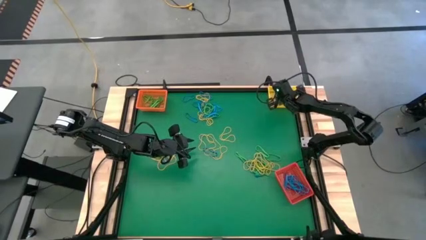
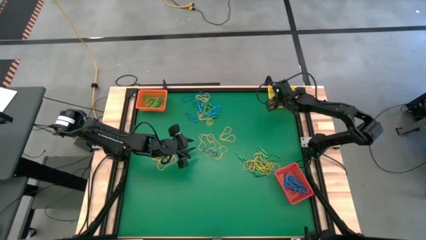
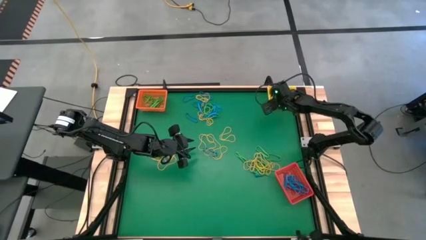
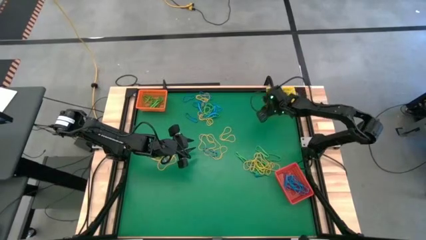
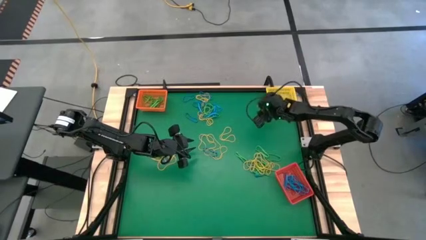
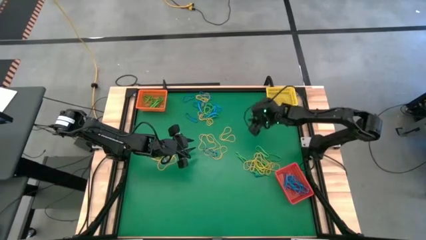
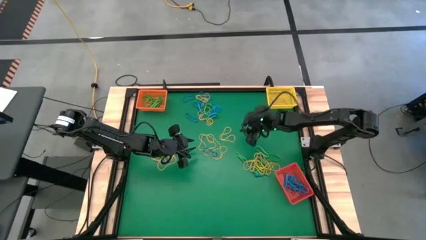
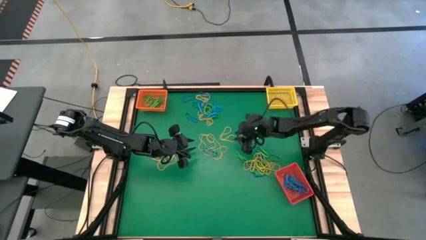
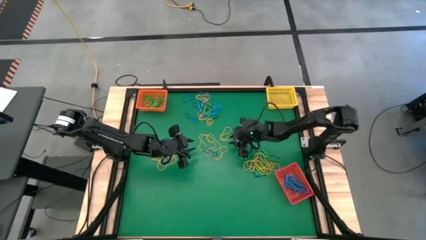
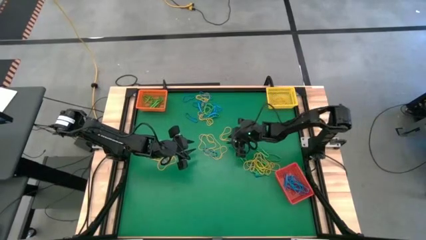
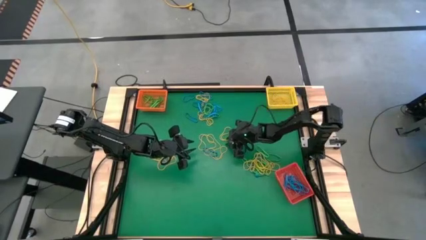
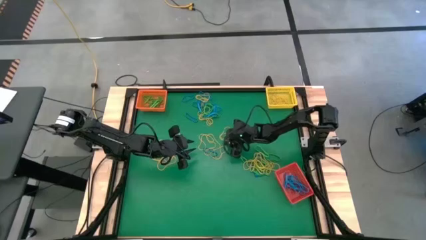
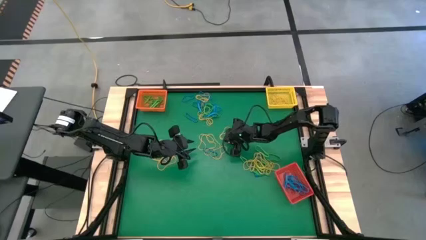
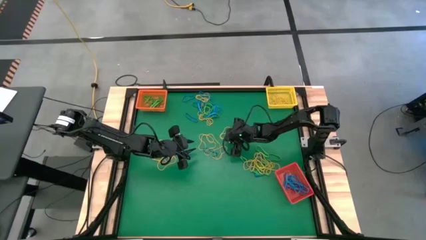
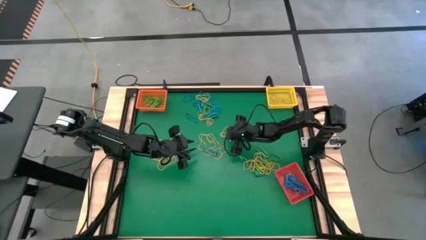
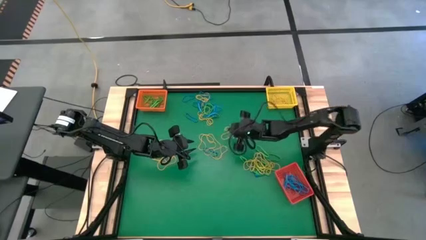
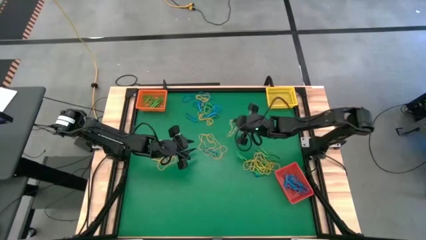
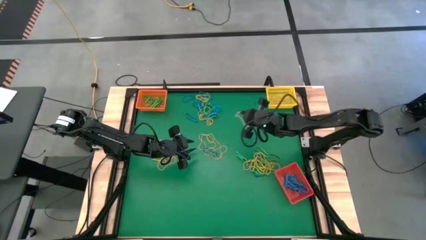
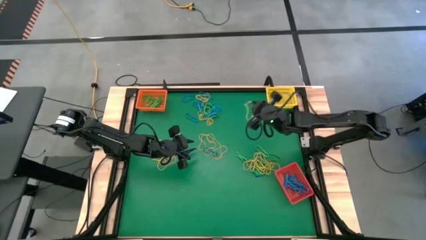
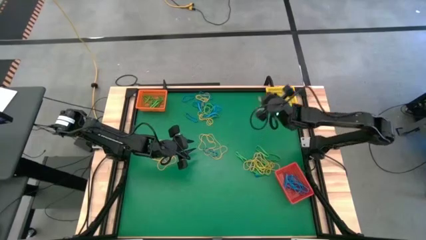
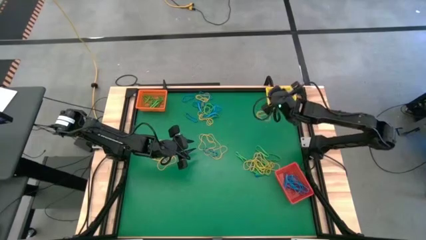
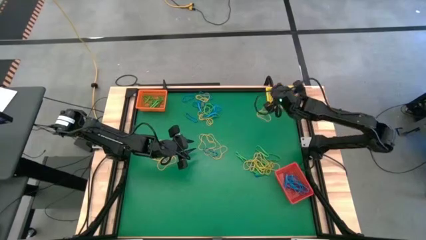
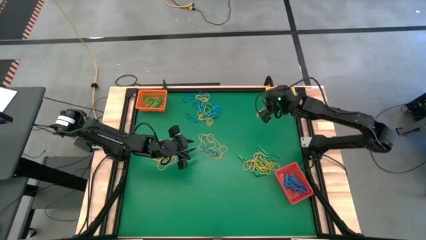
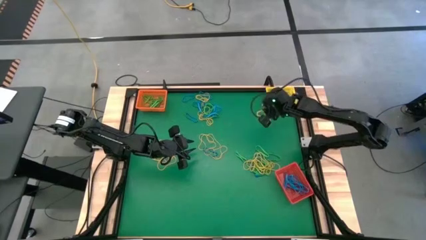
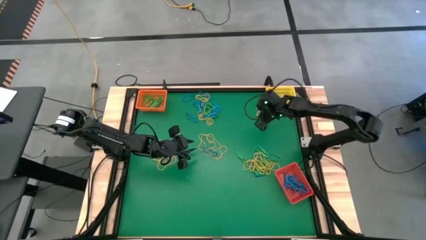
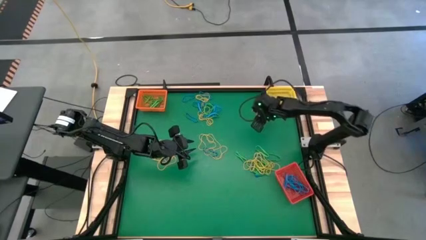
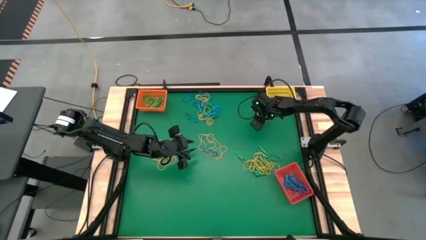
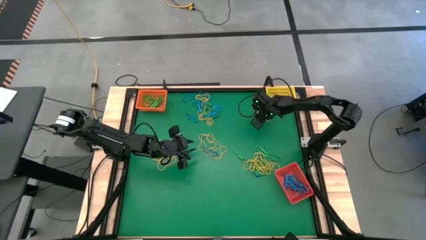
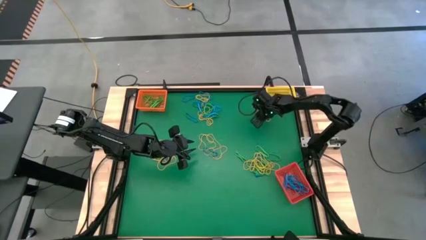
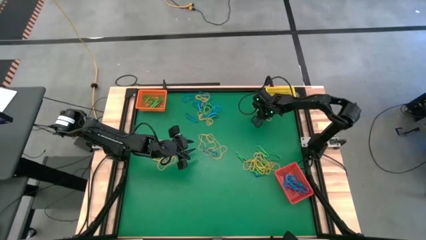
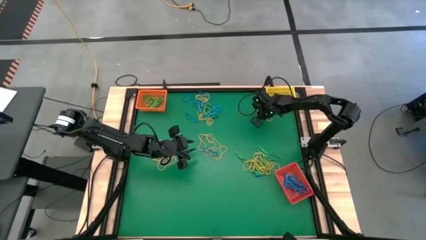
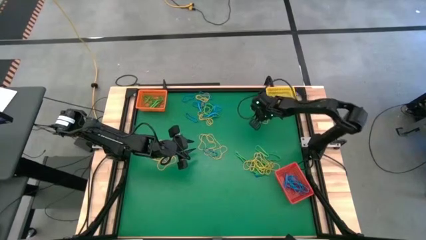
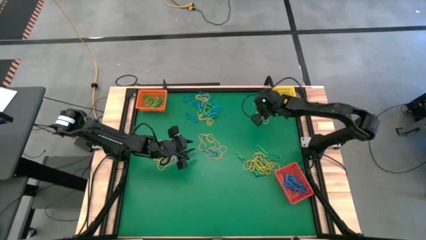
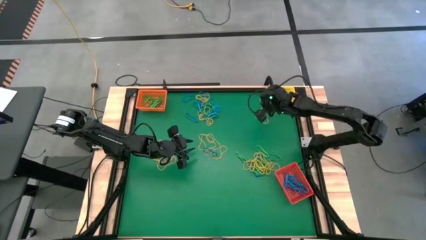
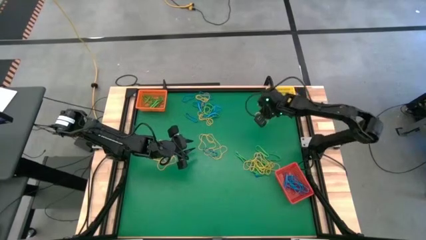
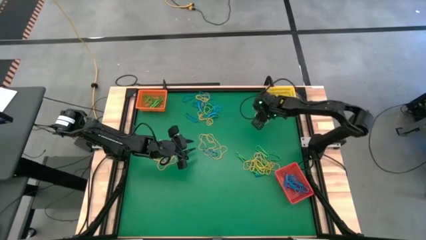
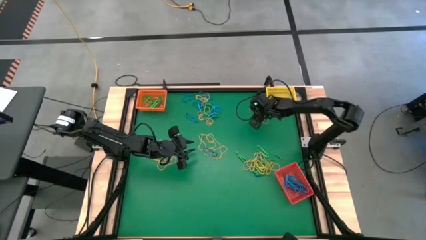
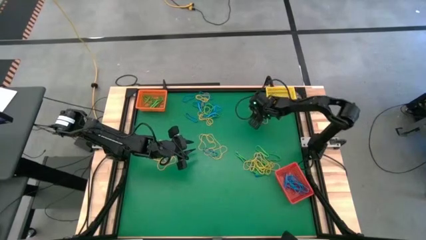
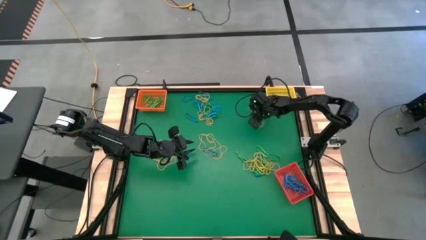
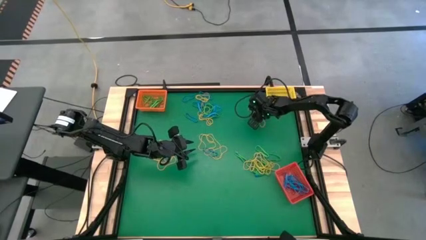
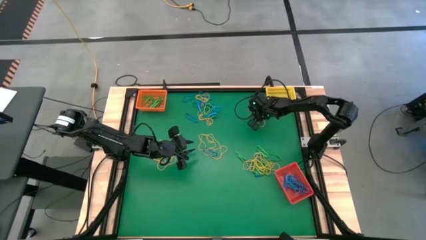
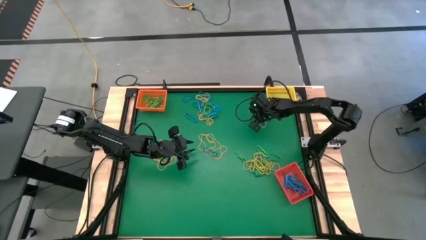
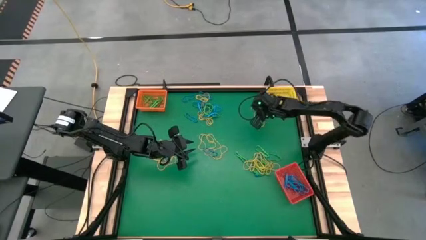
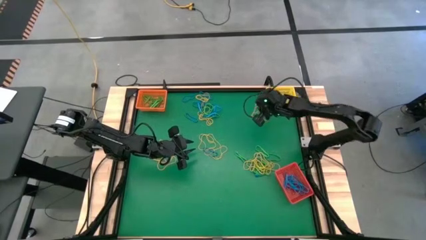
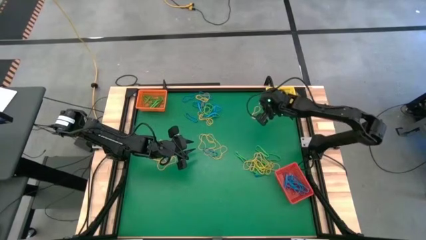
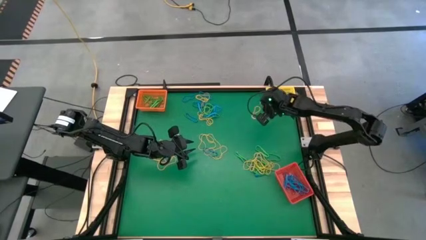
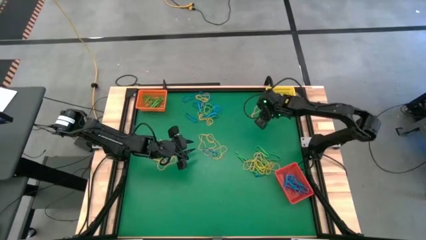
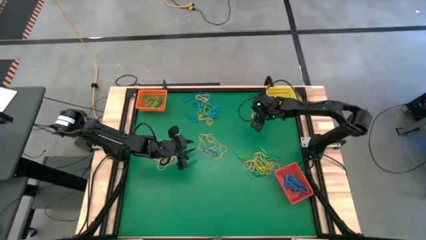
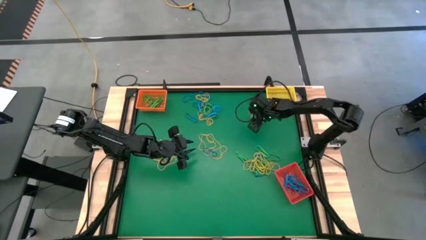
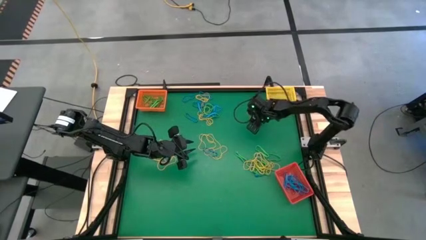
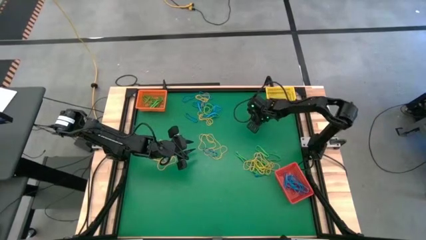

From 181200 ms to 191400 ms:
Task: Sort rubber bands into baskets
Put the yellow rubber band into the yellow bin

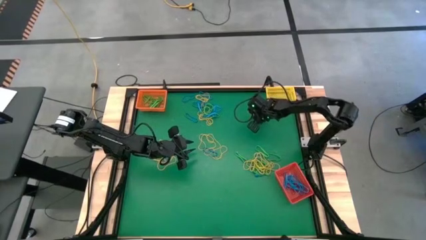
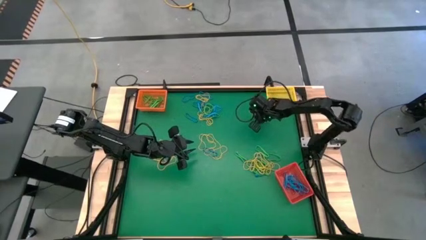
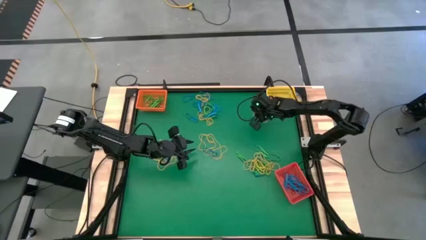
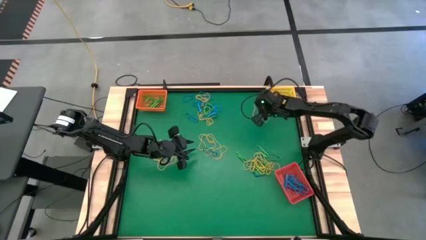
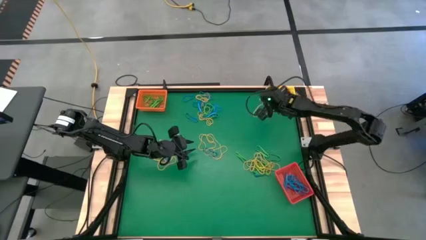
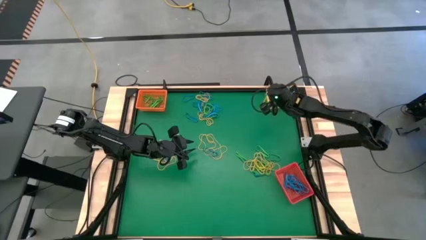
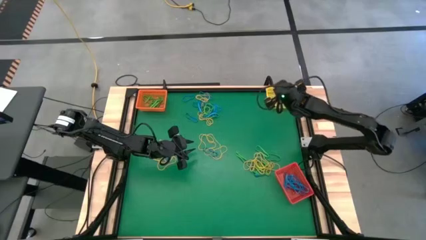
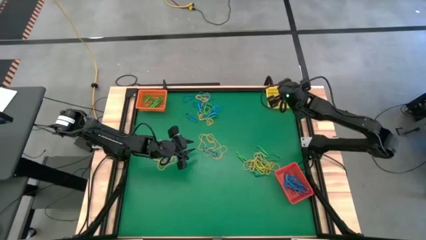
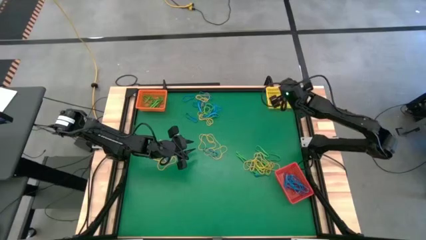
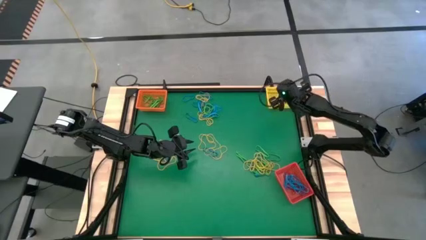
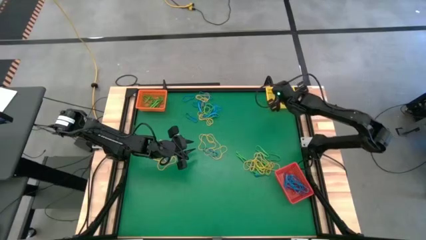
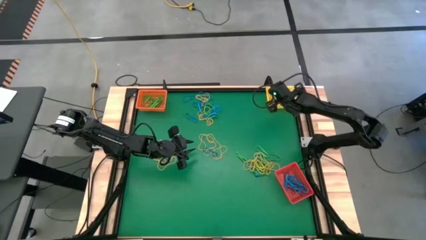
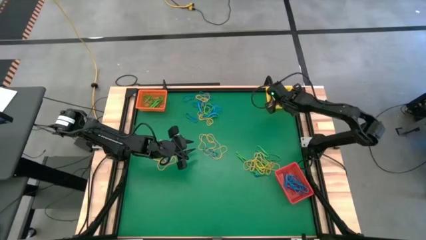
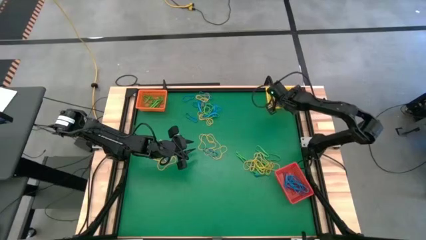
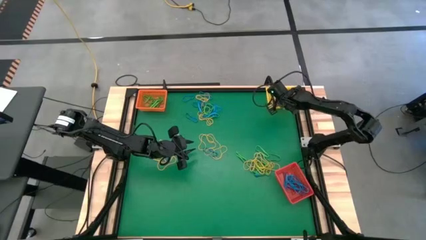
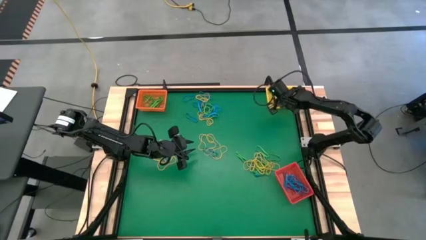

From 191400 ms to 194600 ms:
Put the yellow rubber band into the yellow bin

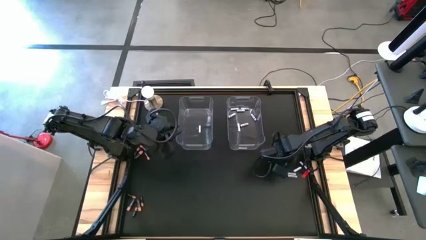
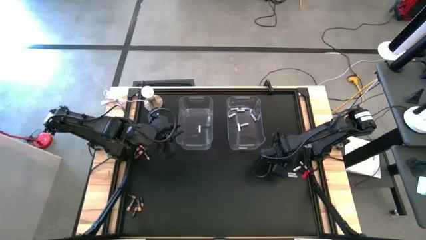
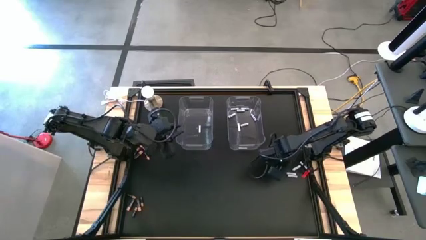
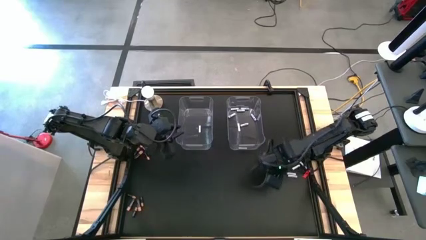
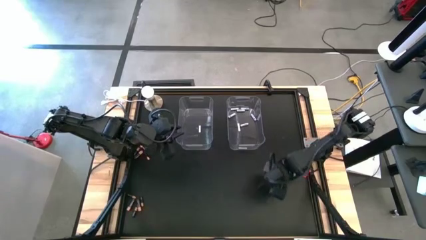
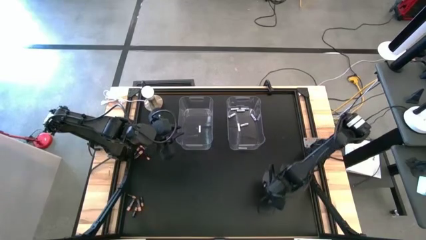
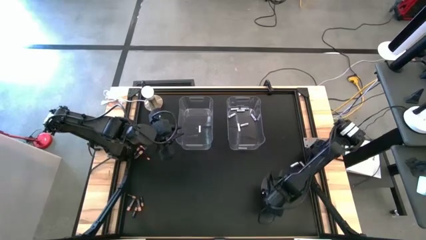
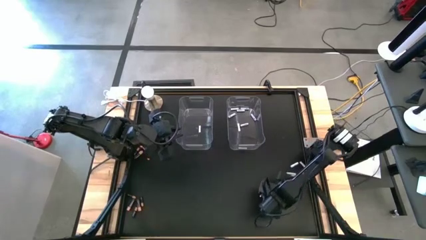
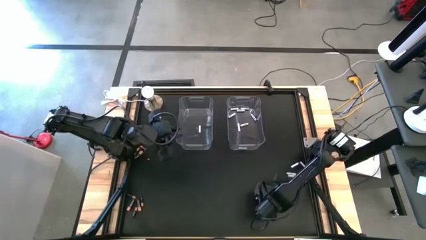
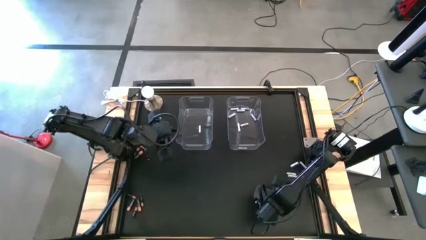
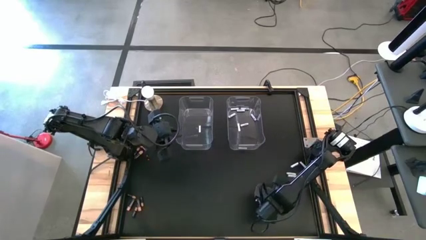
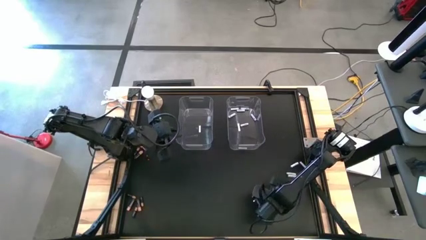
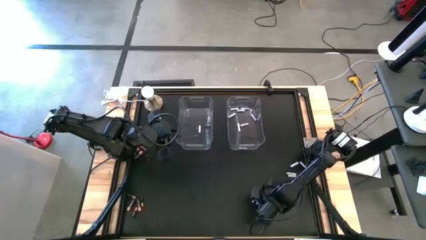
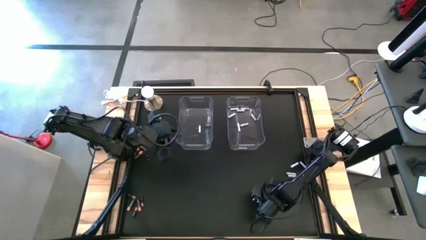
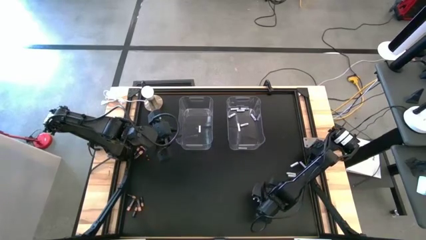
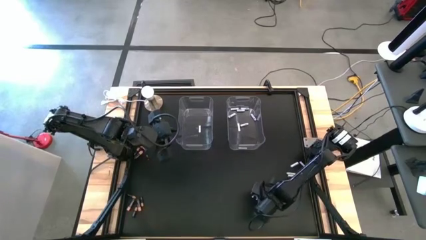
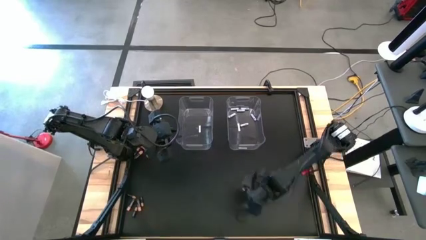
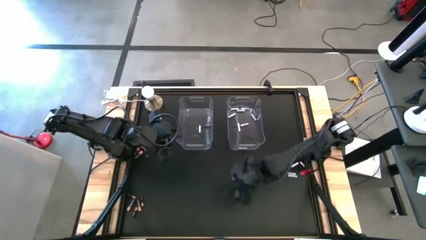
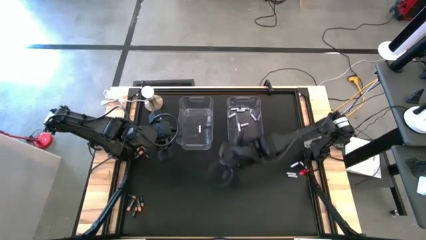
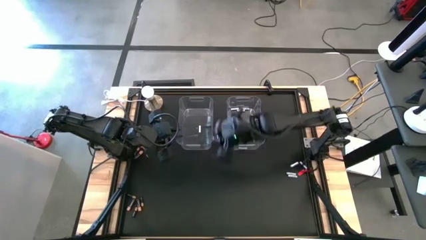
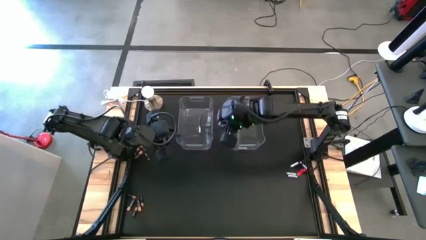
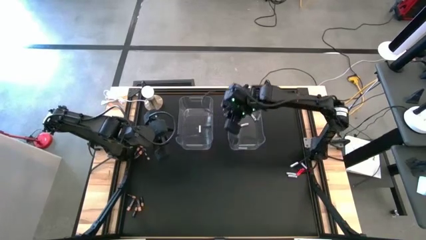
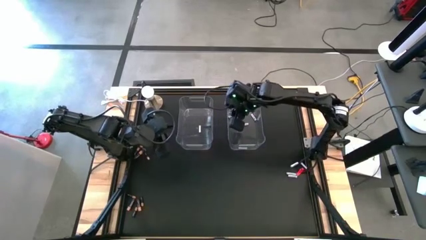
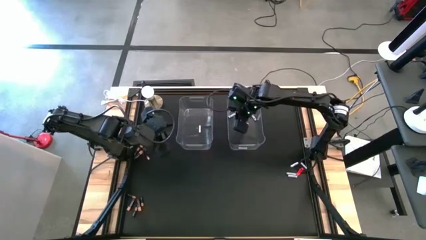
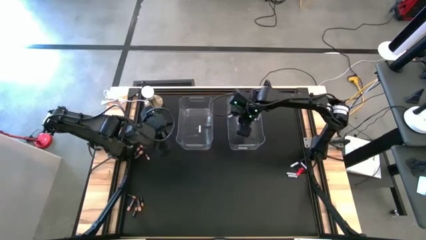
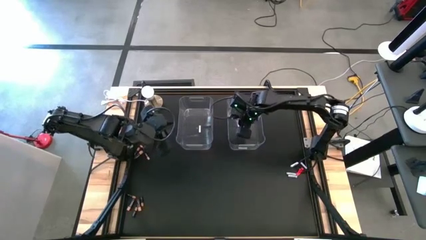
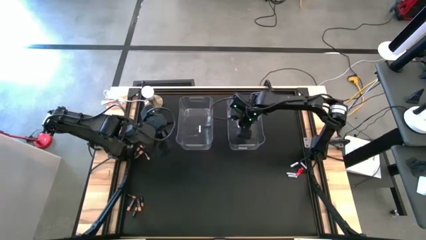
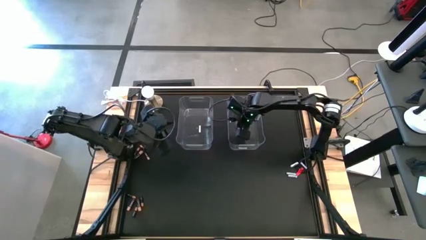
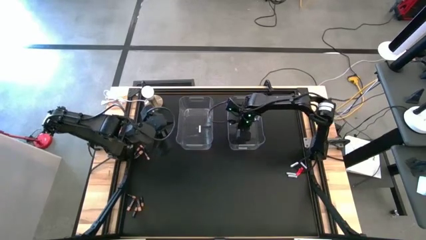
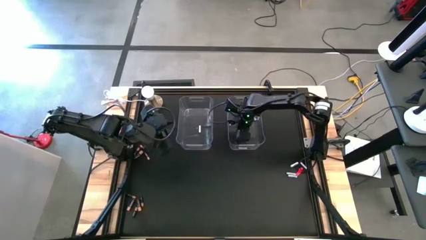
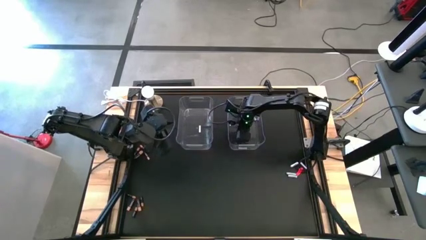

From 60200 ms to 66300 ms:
Task: Sort batteries
Put the white battery into the right transparent bin
